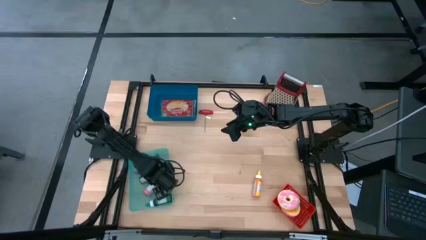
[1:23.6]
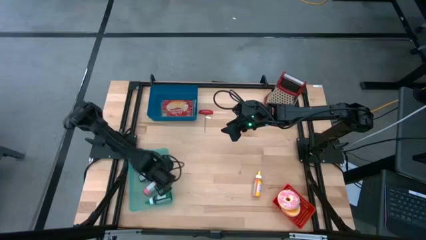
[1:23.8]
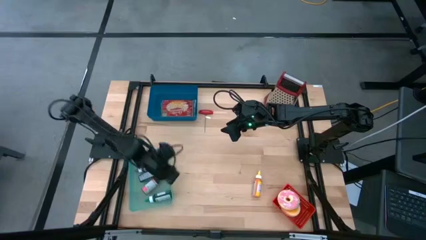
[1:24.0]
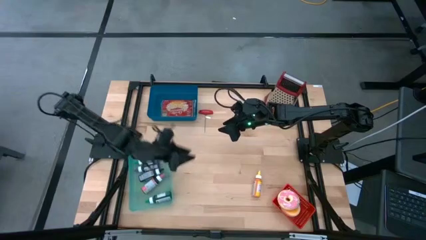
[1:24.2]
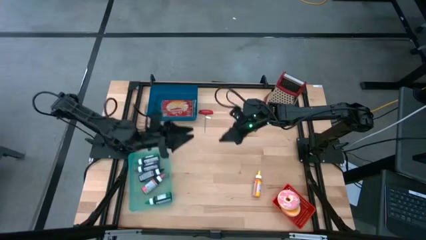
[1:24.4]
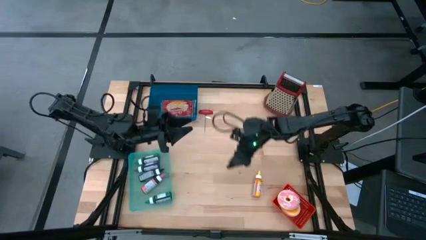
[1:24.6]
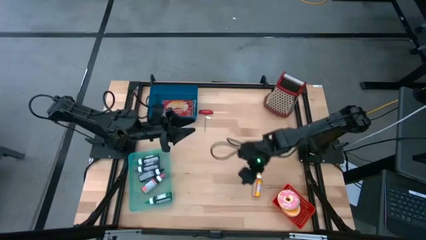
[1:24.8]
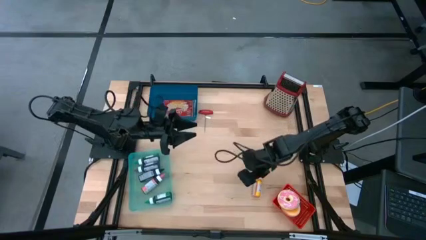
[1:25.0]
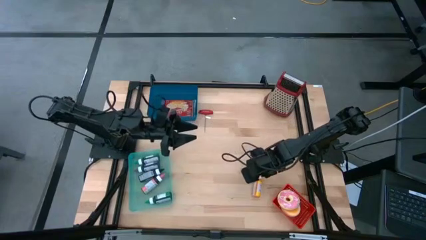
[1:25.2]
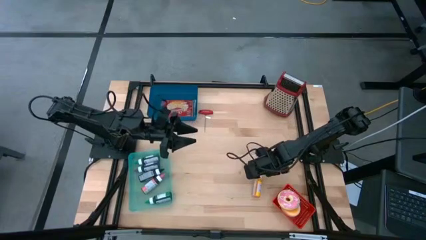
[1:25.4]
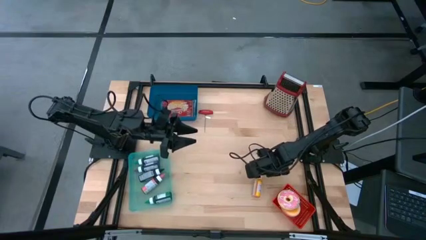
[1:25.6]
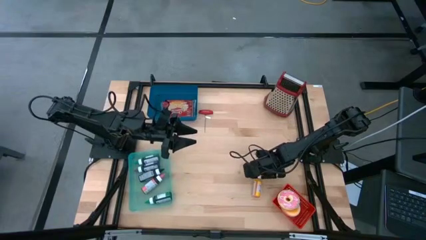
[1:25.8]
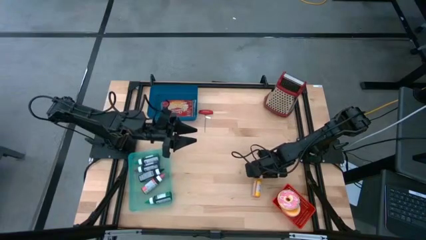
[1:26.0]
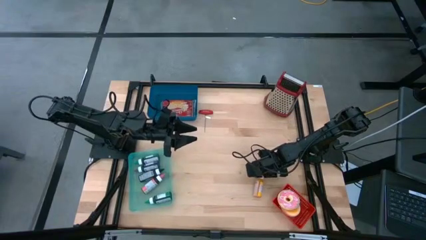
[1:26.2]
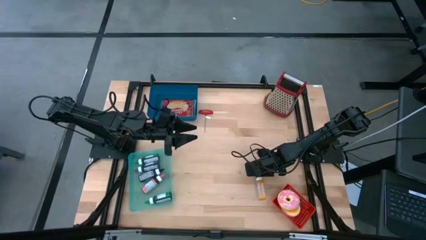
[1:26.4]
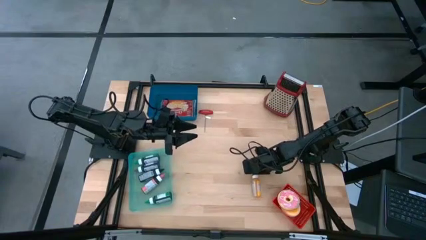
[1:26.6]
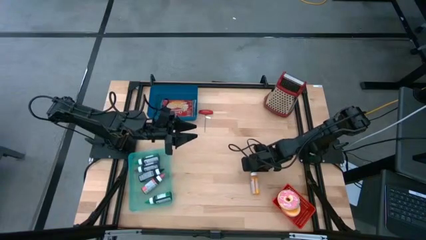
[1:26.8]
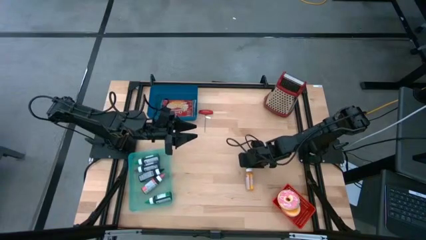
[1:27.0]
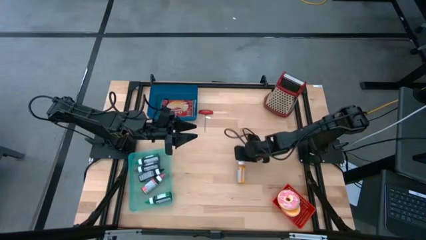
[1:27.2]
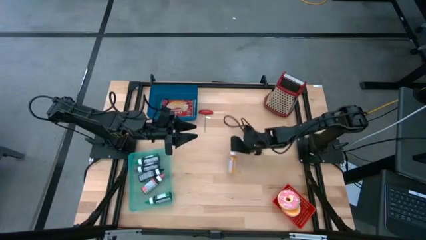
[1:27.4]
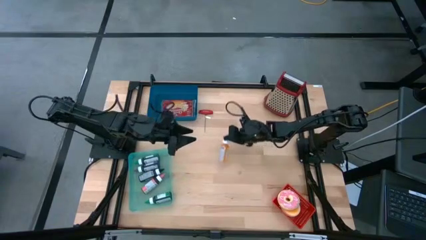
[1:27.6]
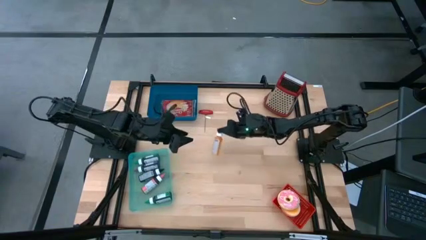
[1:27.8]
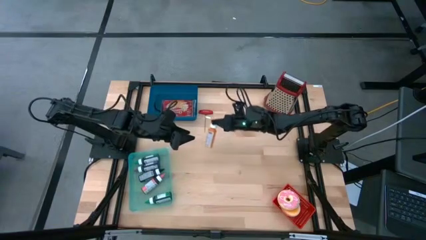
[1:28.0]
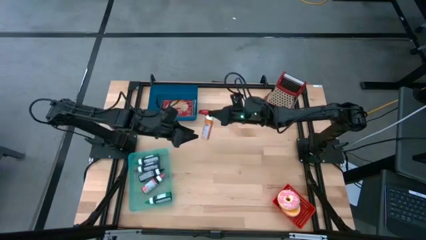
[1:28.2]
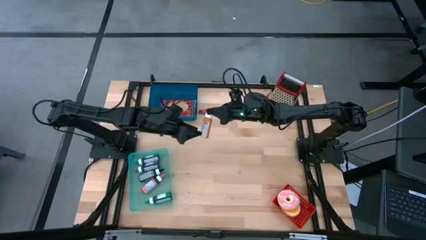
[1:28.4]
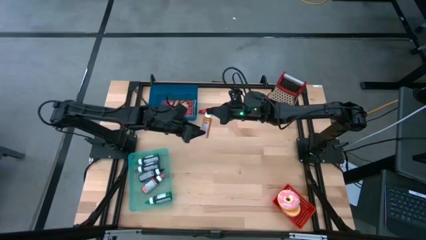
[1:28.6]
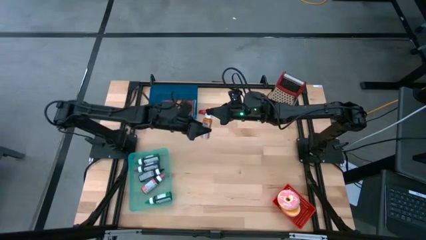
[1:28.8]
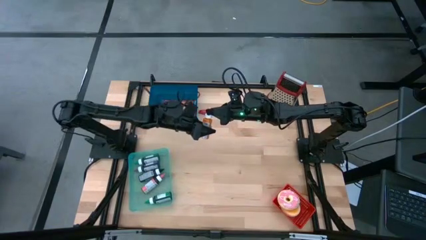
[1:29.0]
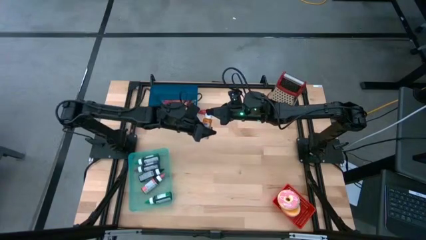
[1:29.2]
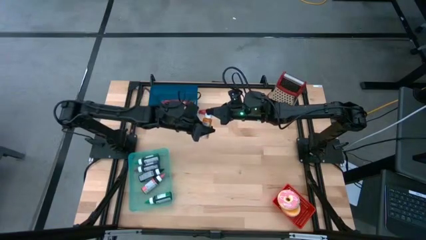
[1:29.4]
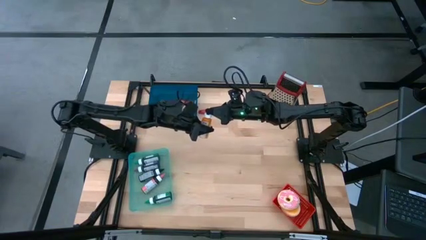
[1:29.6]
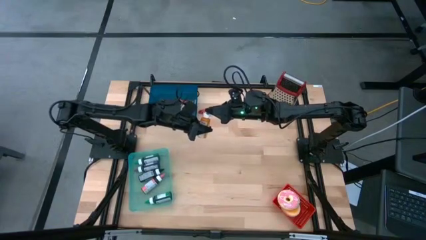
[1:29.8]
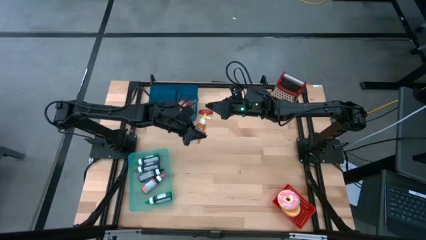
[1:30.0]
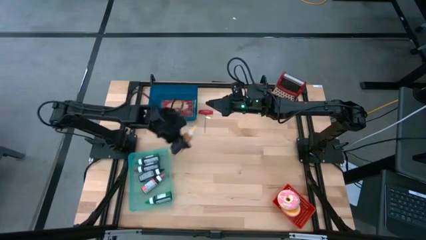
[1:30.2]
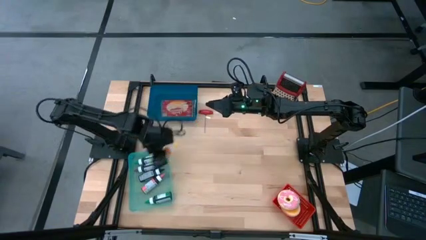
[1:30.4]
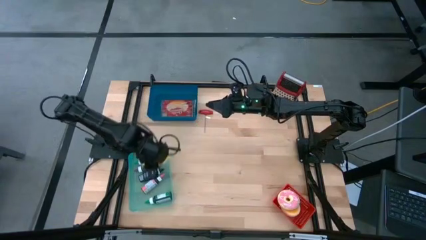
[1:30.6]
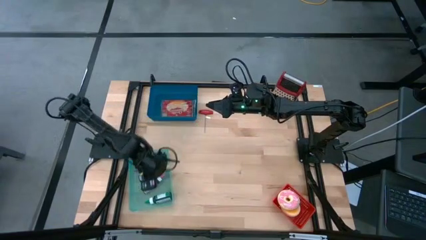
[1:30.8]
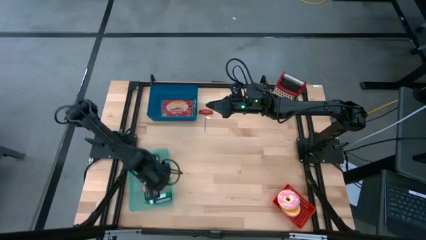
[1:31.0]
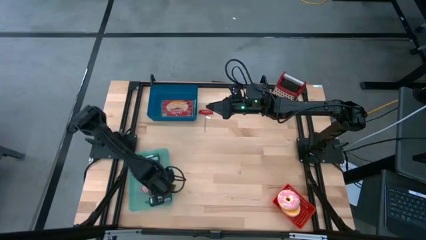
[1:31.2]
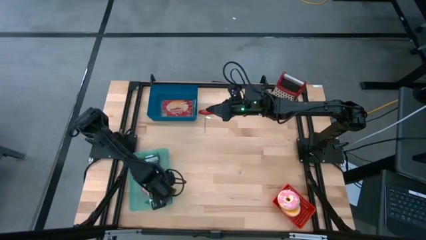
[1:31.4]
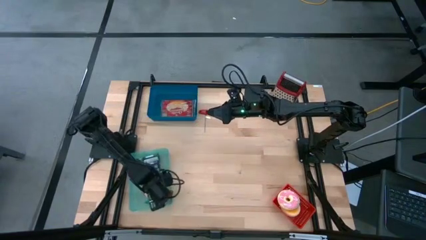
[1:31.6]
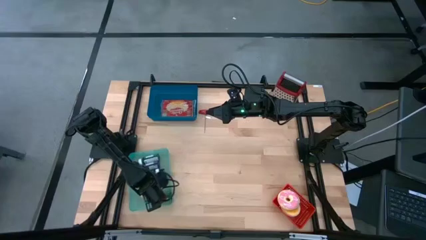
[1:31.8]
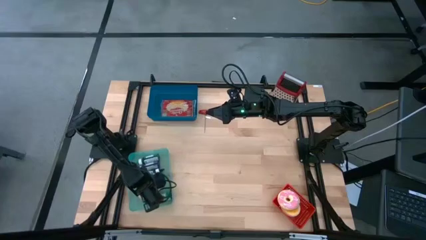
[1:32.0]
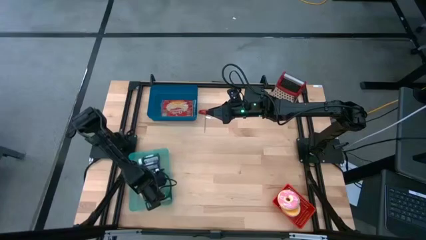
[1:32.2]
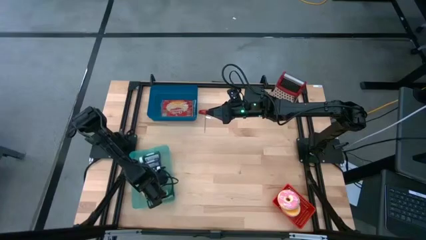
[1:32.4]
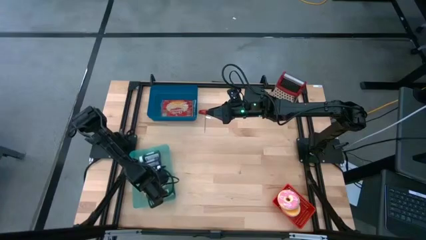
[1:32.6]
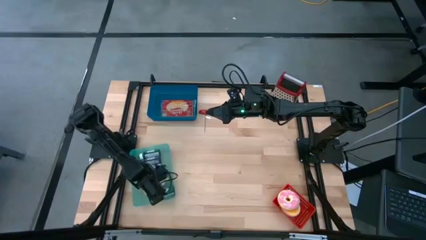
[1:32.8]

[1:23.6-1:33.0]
Put the yellow food coloring bottle into the green bin

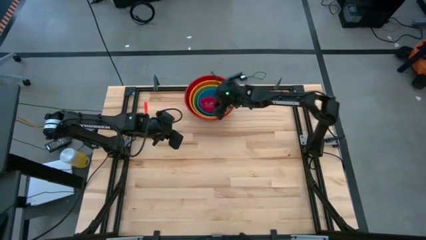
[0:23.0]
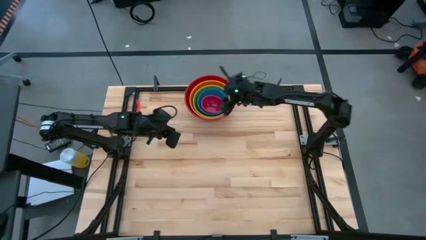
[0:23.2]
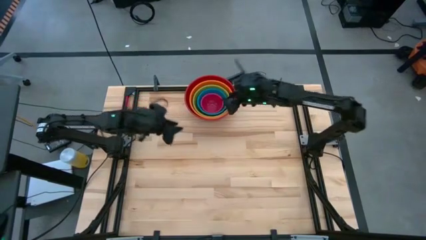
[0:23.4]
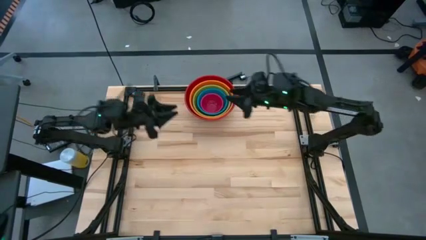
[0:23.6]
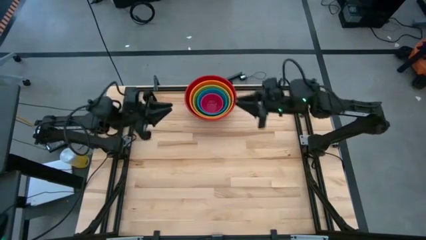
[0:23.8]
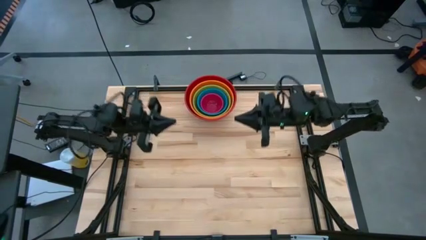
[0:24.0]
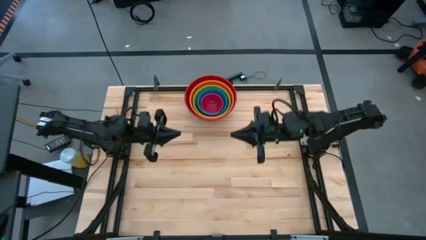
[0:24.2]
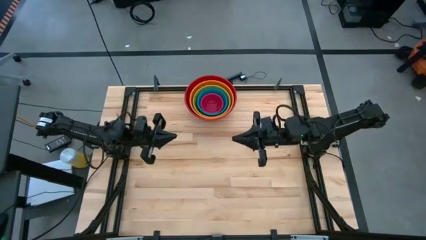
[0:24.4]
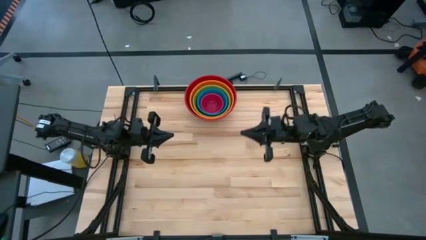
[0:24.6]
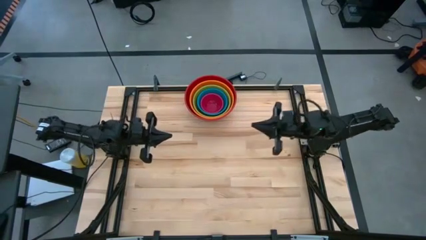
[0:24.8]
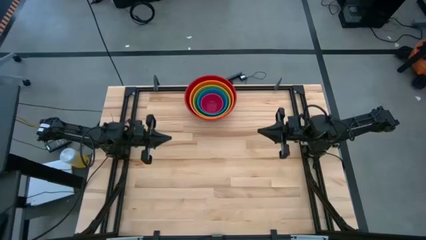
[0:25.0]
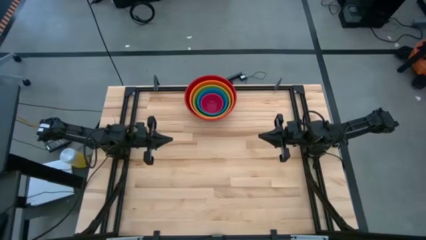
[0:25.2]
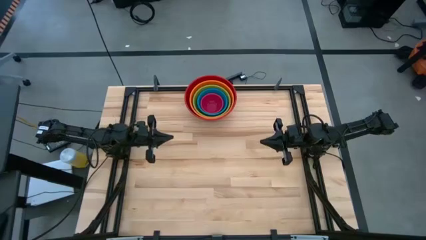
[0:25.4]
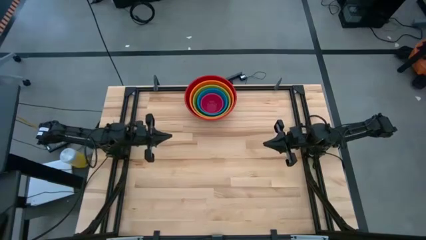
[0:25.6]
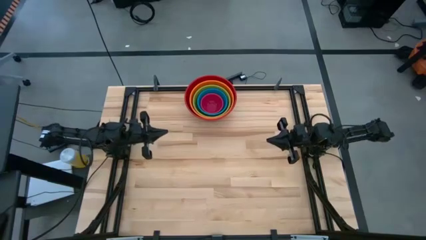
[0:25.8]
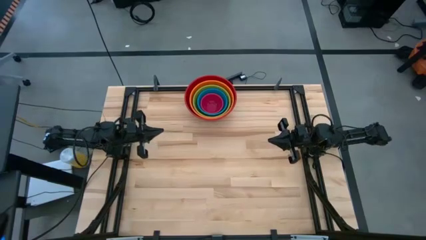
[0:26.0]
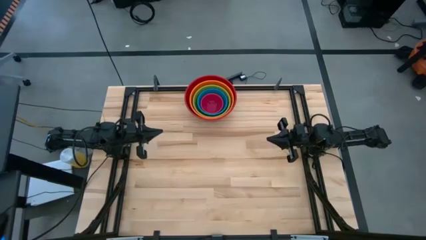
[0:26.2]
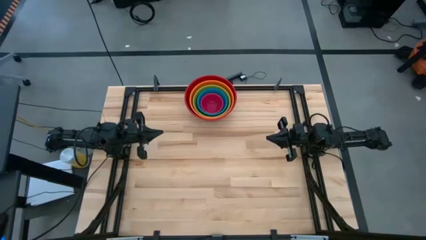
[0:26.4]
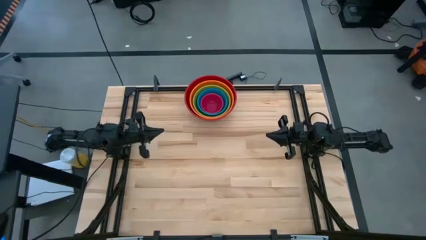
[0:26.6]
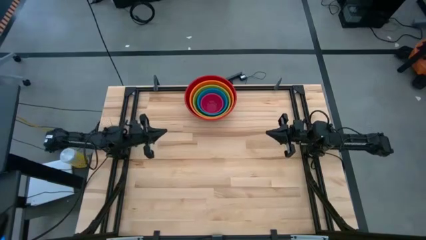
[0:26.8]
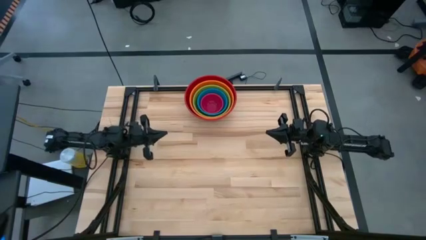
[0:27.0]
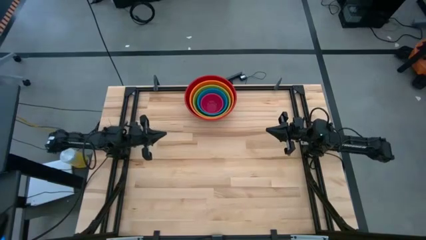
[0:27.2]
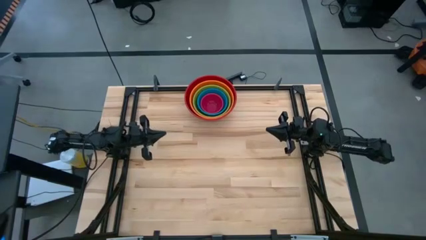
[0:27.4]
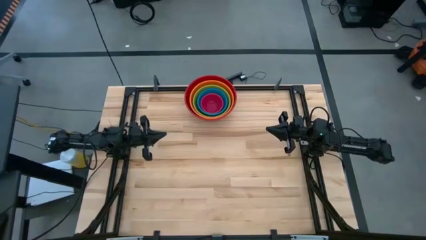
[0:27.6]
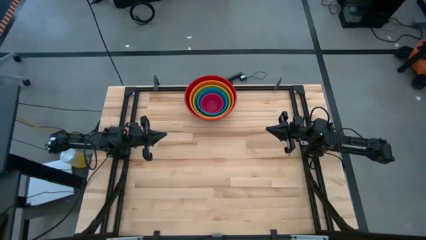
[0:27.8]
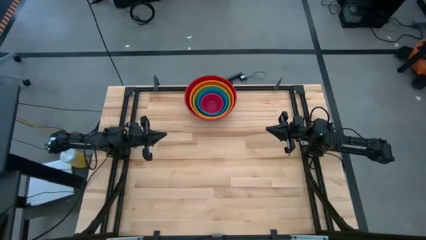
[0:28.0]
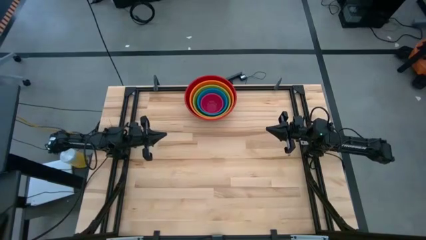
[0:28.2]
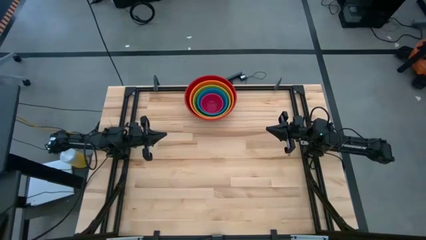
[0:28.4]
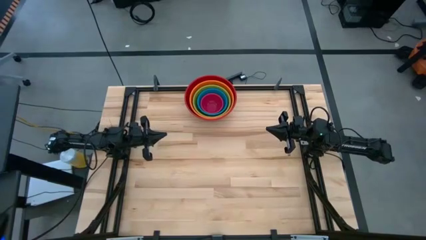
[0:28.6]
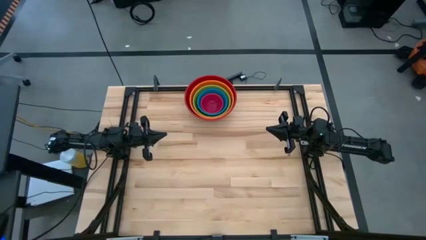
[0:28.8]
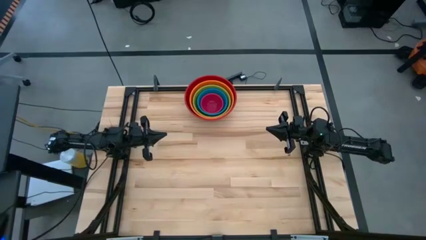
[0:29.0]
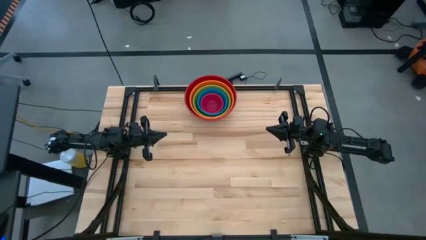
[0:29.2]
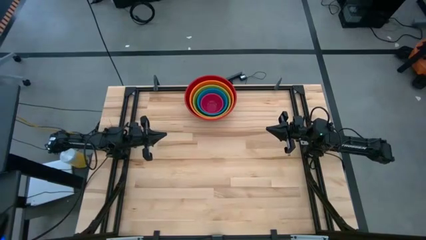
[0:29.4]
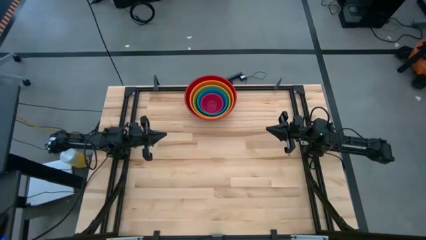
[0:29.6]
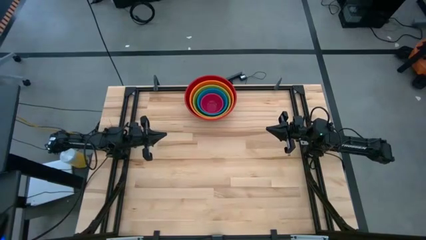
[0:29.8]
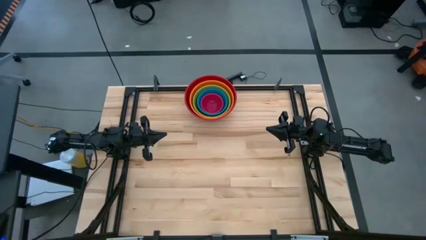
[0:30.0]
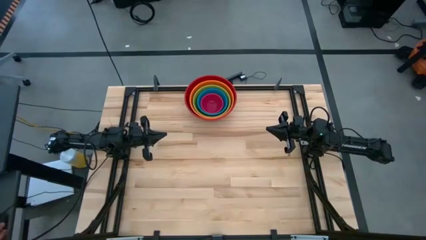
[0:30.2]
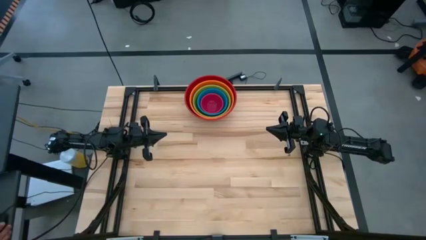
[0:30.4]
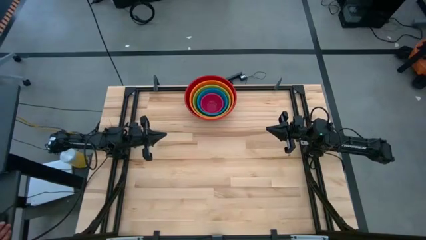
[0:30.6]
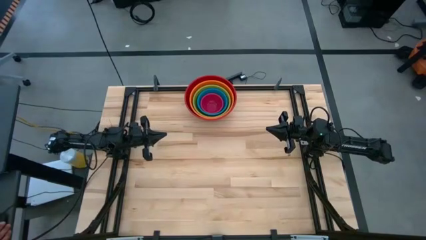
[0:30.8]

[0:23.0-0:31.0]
Return to Home Position
